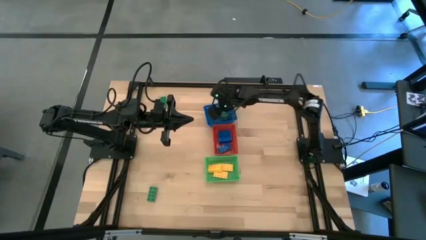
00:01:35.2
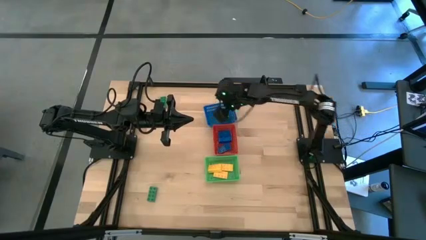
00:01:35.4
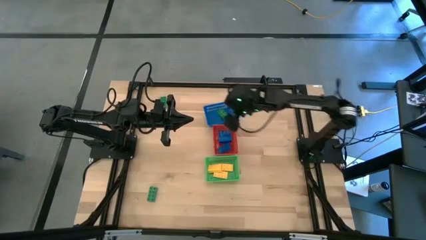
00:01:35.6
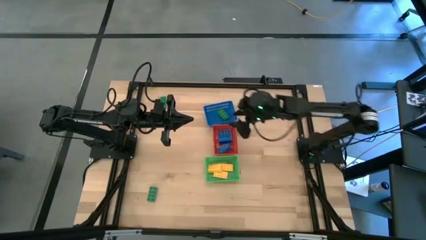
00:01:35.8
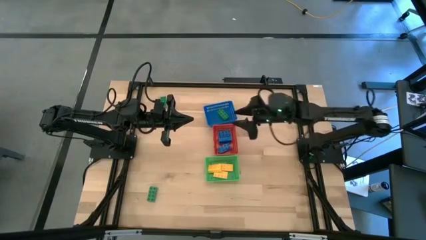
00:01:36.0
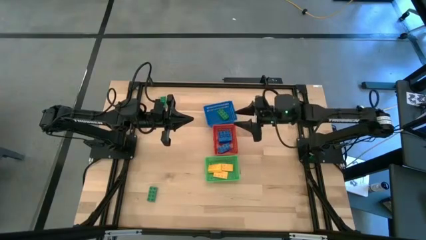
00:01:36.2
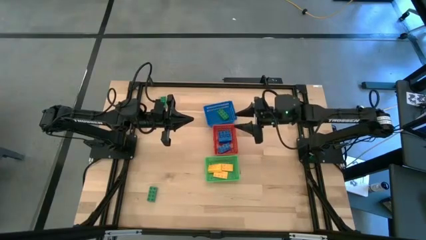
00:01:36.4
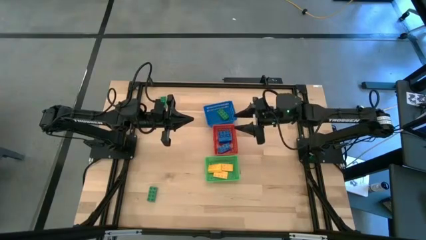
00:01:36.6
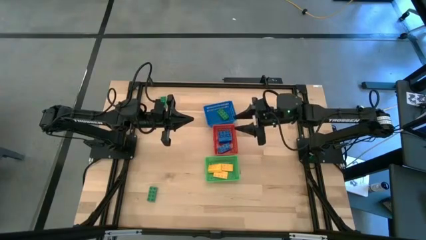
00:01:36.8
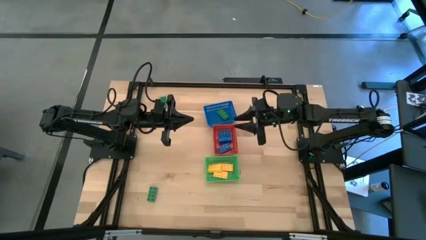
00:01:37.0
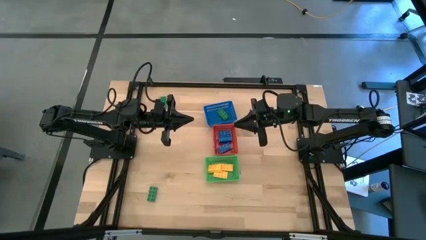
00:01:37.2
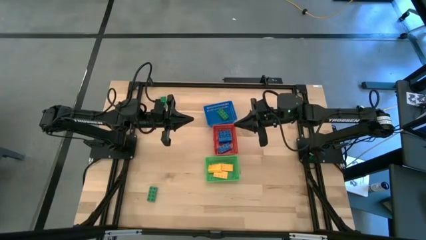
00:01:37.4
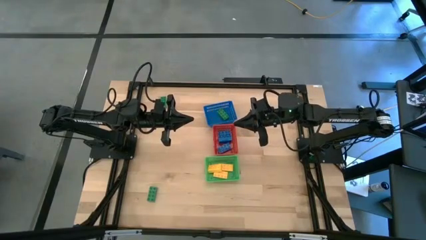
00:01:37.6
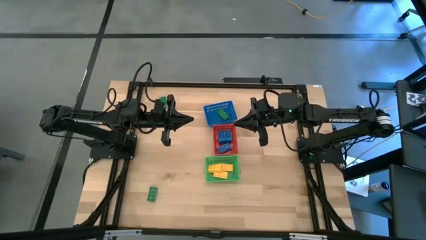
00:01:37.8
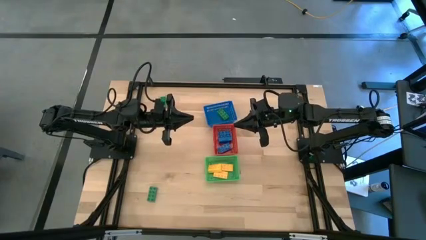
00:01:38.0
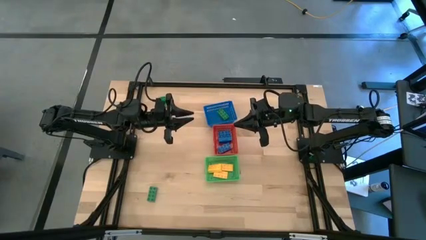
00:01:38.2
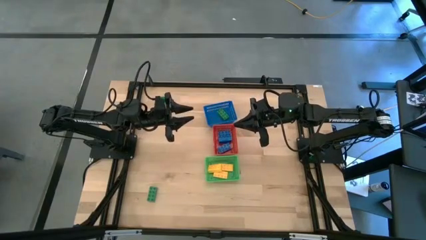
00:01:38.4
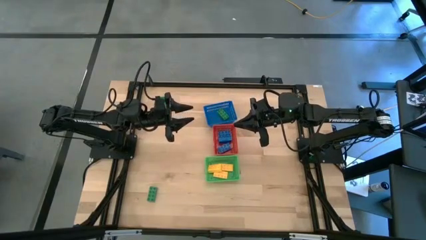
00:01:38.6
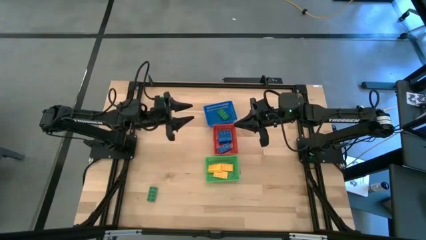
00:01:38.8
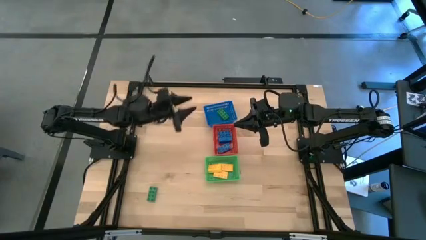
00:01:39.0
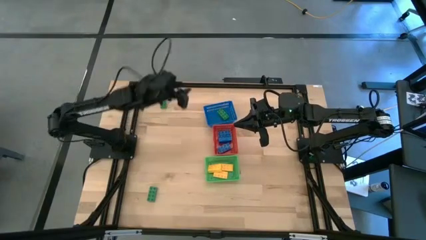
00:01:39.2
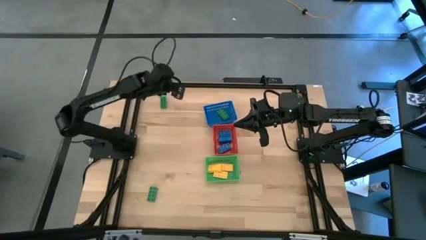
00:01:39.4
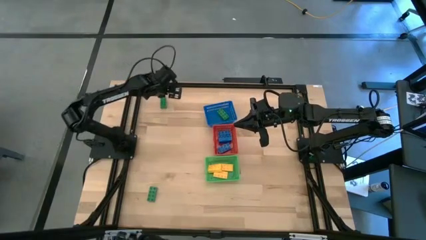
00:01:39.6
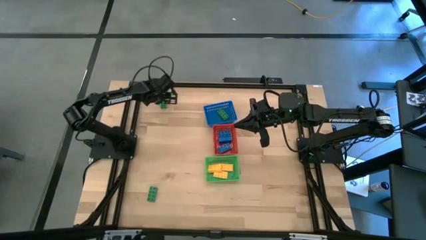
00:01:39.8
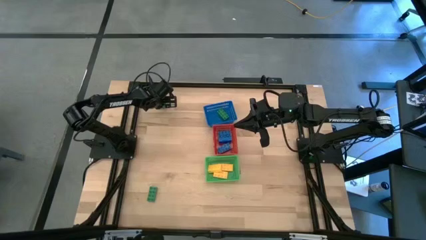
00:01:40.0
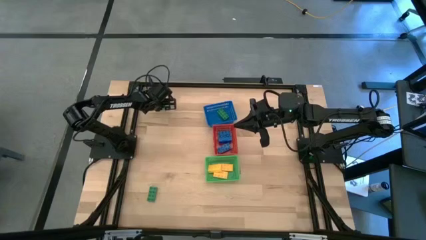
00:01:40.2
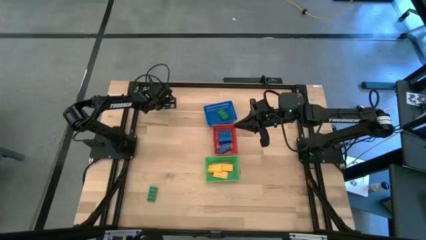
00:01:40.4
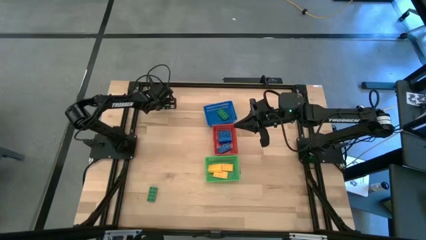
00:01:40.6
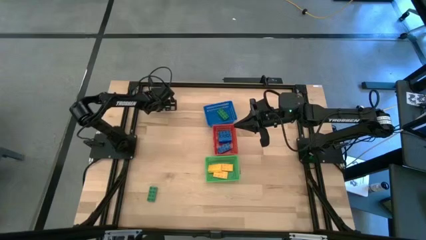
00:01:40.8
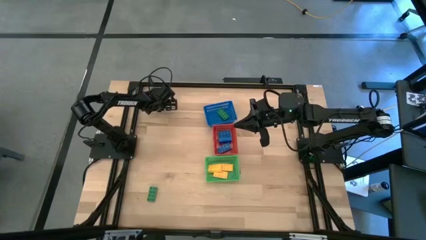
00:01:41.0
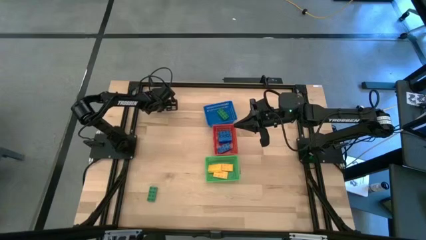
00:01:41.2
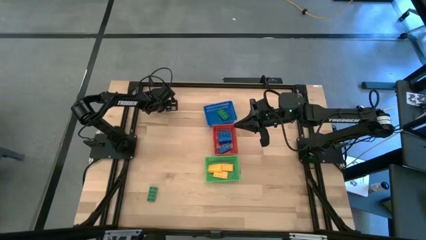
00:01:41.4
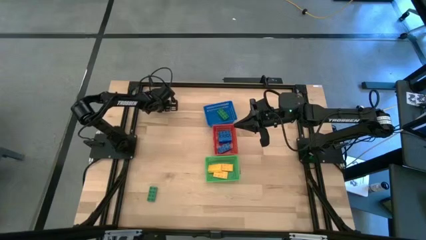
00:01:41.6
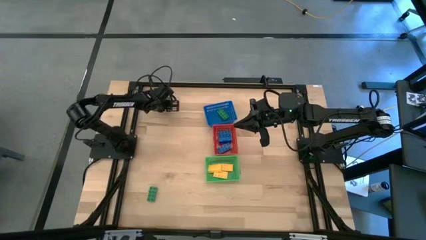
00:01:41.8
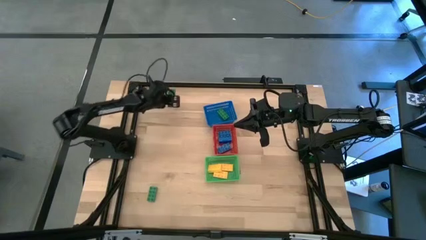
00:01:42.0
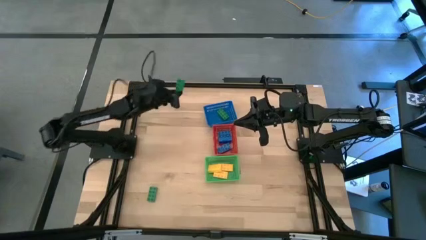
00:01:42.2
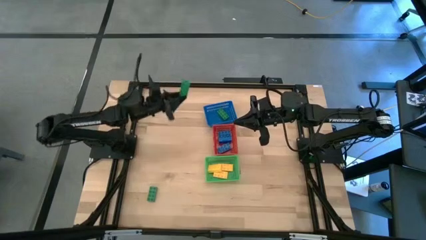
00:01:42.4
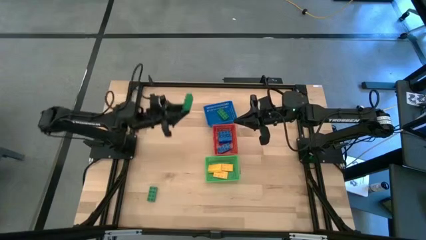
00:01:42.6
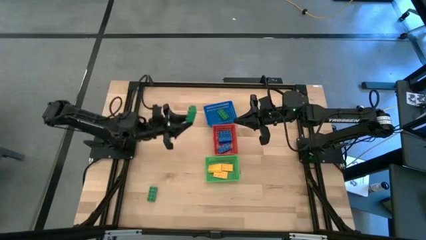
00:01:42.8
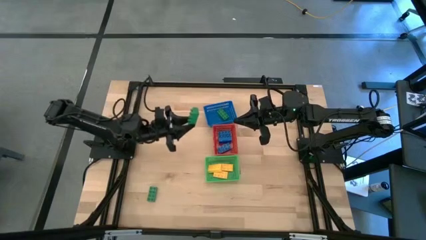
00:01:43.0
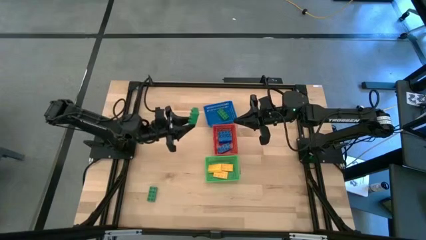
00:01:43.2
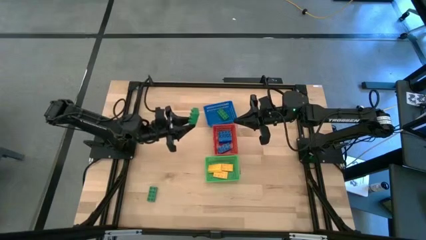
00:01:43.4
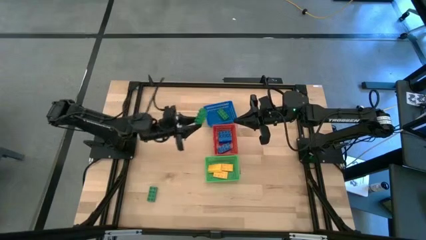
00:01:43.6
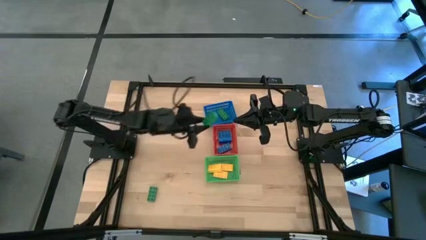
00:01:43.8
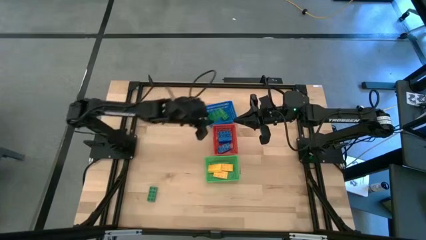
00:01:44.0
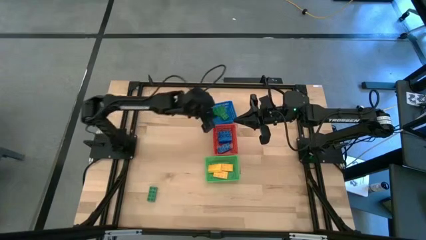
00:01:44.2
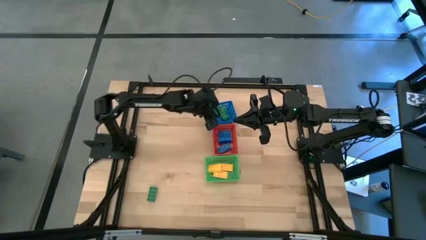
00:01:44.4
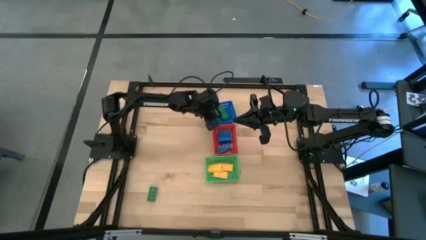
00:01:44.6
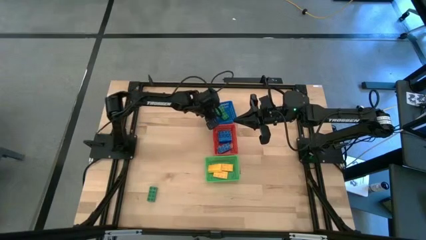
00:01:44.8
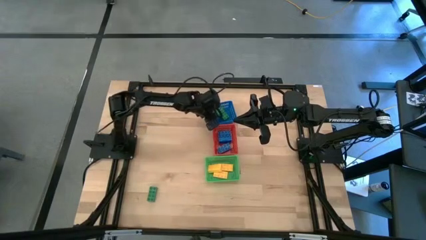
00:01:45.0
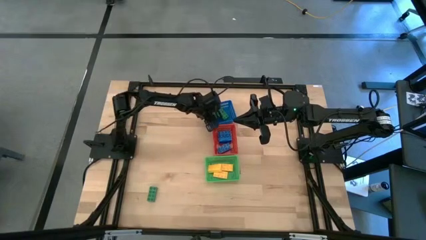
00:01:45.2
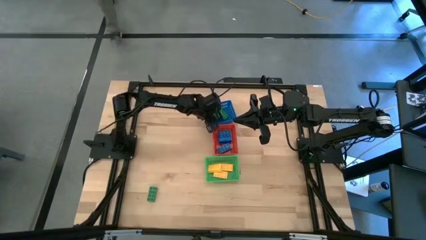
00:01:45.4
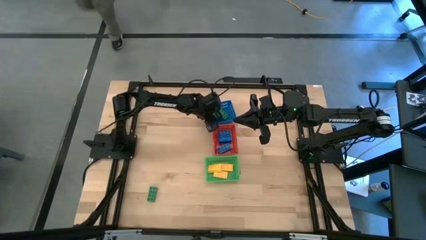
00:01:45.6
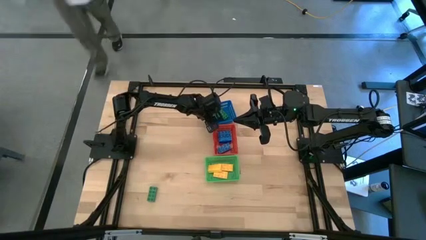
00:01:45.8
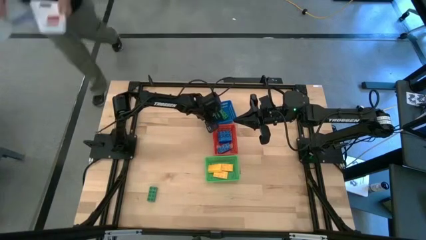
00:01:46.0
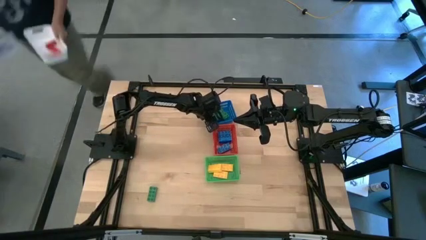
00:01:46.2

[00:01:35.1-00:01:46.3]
Task: Sort & place blocks by color
Put the top green game piece into the blue basket
